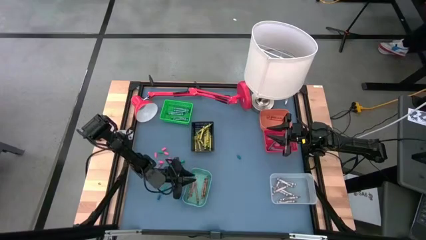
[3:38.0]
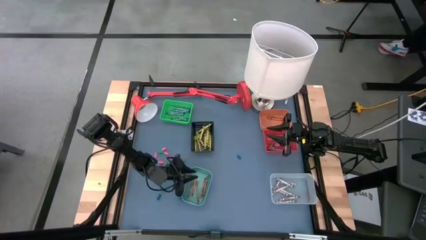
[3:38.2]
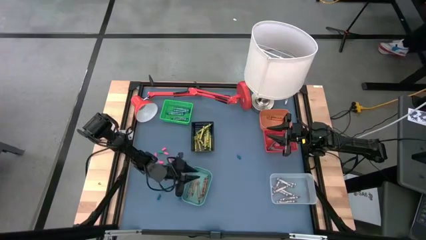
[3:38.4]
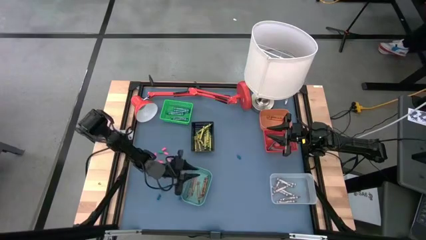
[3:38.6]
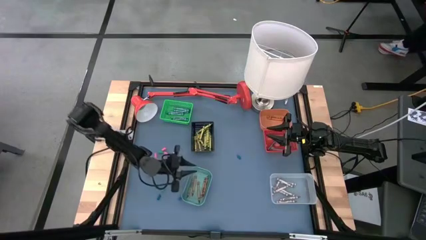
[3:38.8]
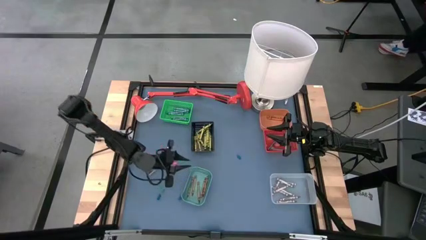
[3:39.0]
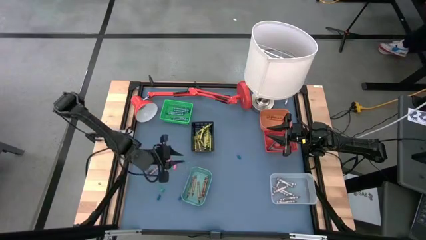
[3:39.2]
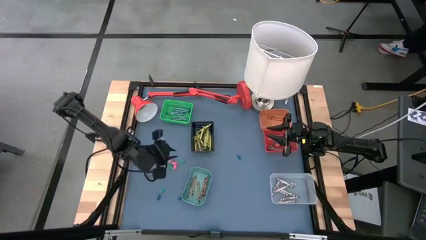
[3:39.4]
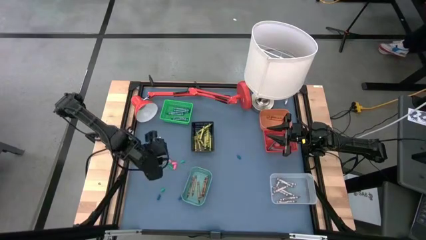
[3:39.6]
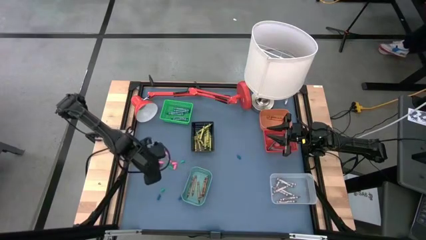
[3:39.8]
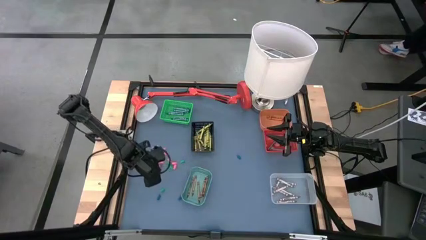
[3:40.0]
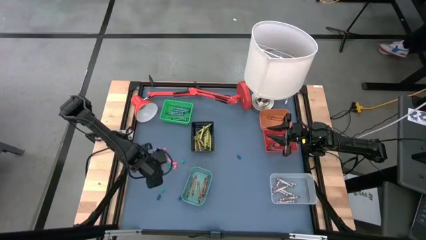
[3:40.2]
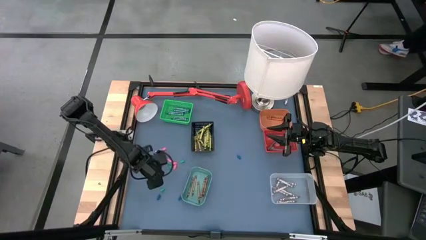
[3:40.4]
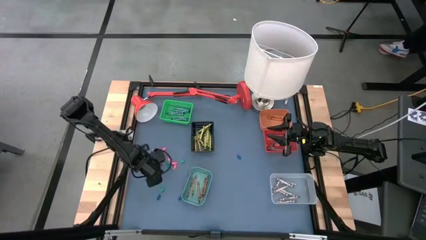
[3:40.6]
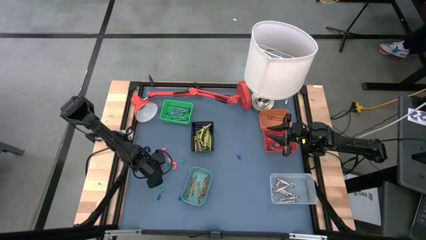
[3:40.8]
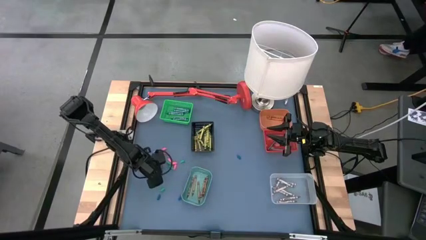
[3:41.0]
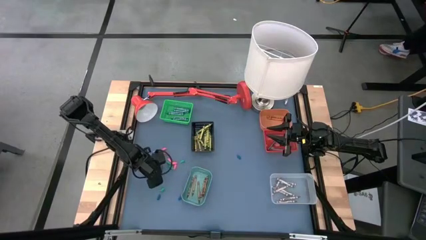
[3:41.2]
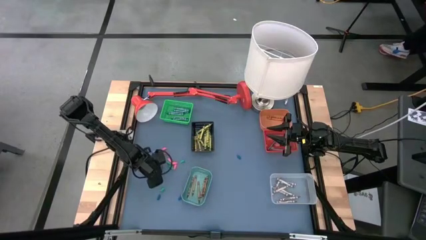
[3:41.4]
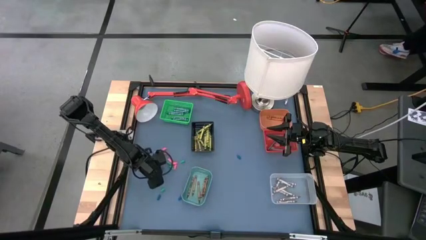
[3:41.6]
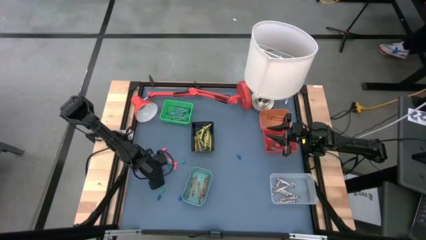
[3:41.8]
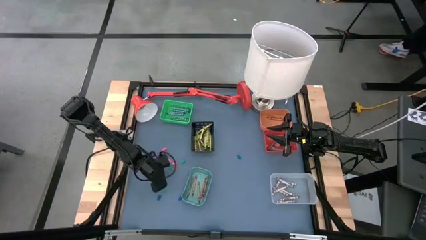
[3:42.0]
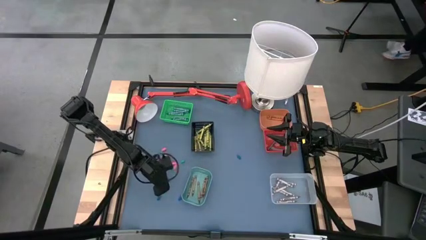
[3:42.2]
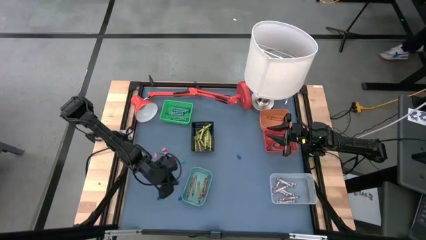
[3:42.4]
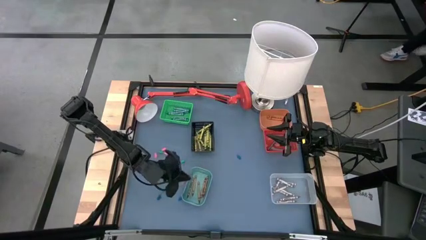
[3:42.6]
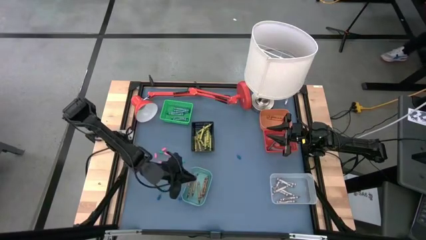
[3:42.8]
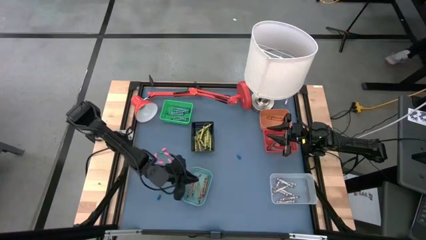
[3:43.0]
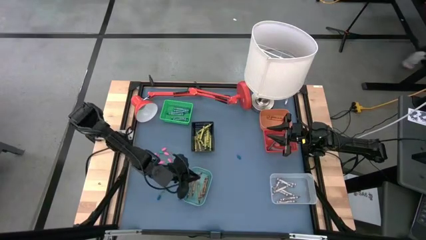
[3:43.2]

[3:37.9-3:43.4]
Task: Sort crayons
Put the brown crayon into the light green bin

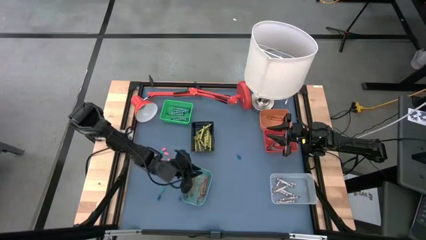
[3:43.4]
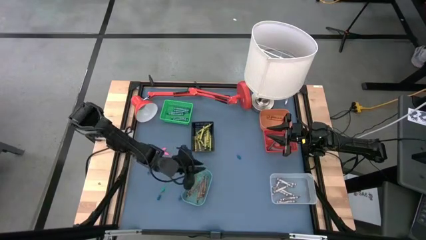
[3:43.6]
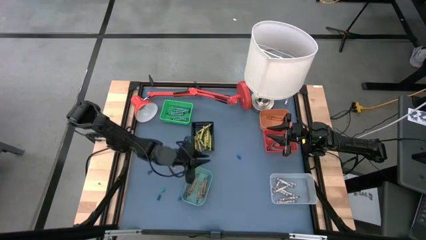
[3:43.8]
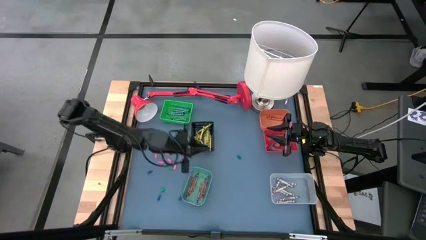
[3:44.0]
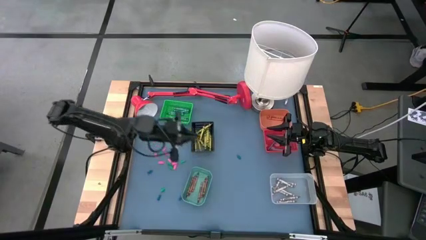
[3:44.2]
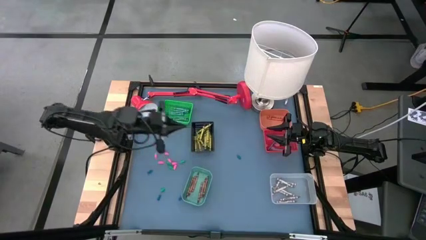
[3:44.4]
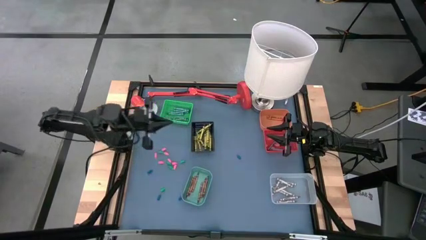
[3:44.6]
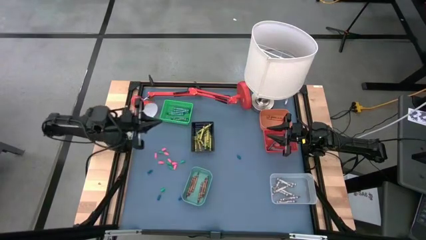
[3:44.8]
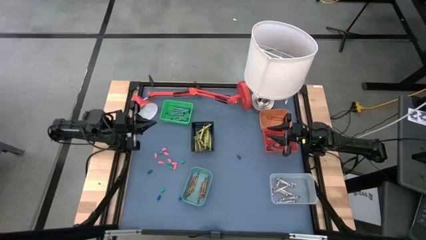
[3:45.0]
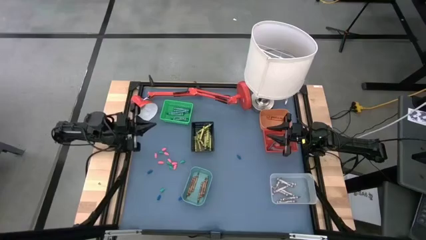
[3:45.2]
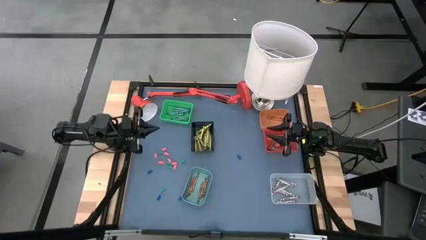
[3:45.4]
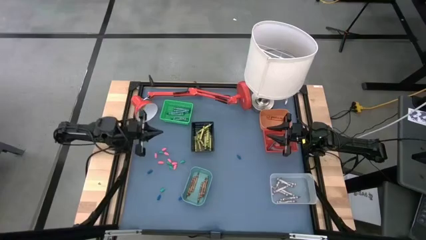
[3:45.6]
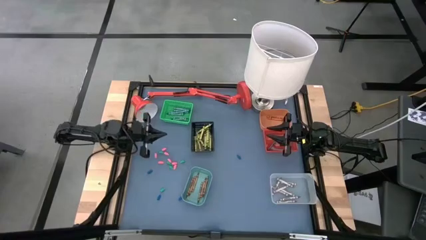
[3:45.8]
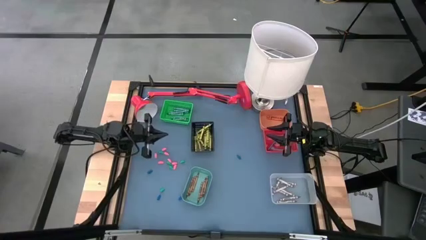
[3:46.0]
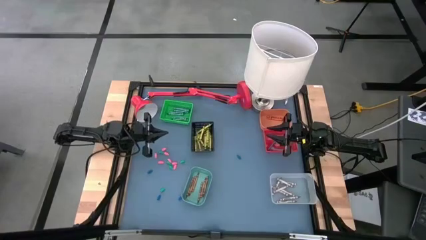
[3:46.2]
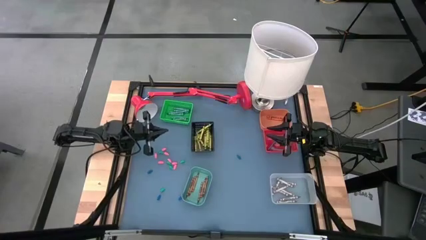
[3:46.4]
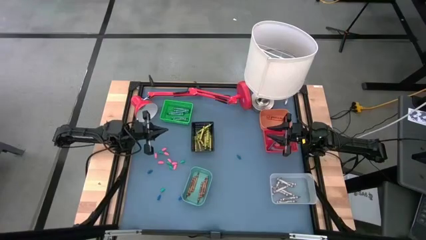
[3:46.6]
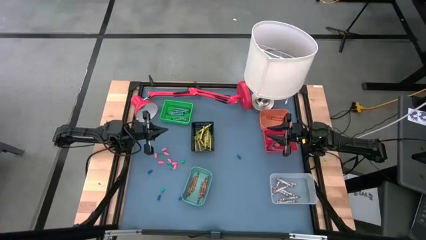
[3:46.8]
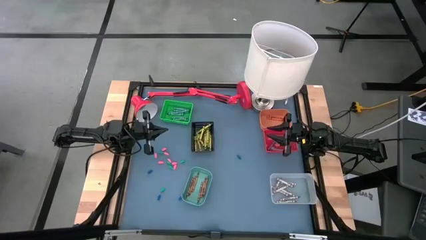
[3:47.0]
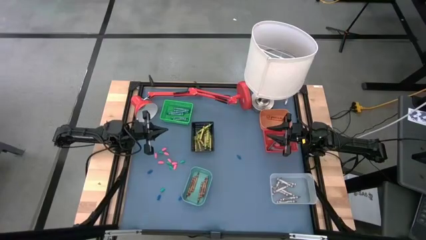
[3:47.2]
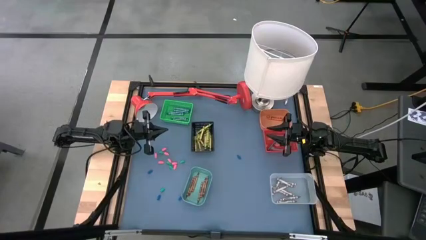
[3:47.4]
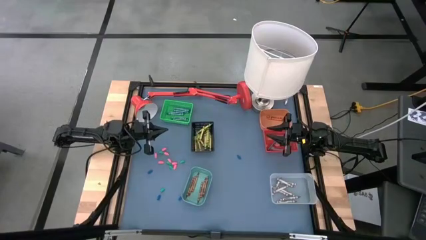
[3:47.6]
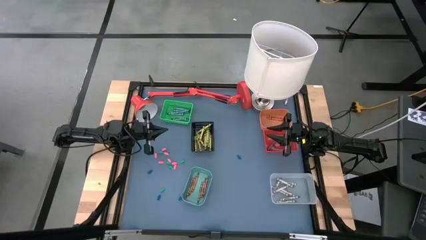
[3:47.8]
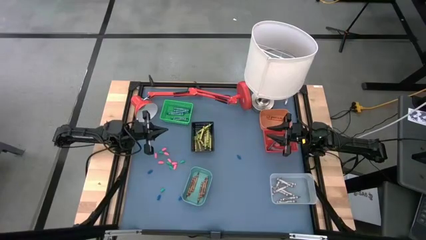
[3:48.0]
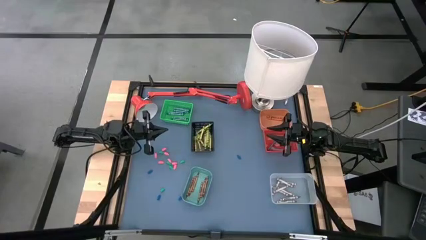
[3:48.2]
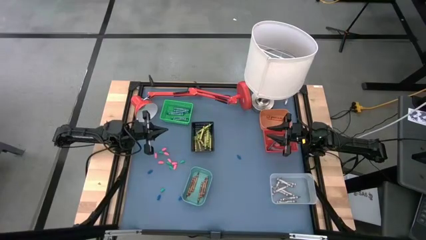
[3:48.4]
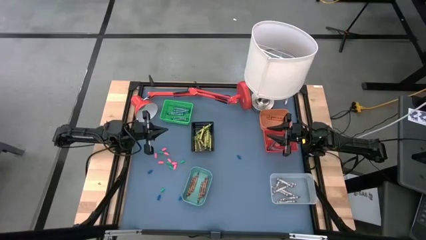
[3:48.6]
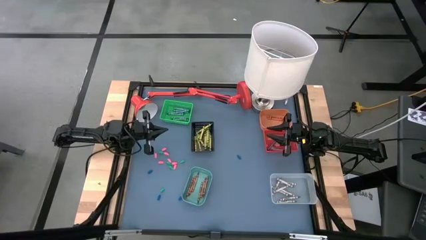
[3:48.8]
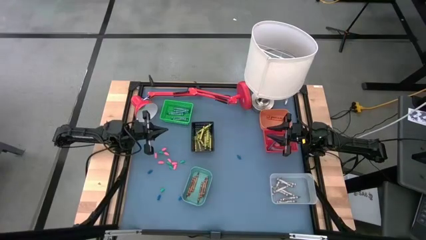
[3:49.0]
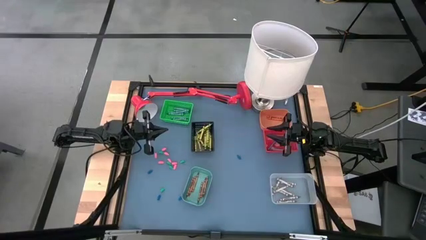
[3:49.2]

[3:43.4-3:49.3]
Return to Home Position

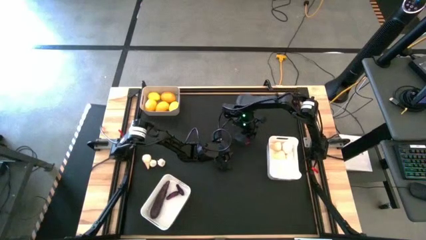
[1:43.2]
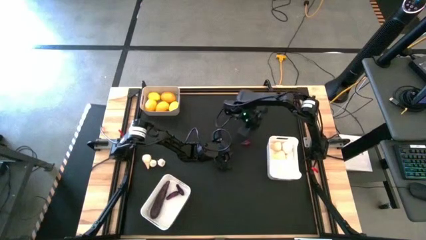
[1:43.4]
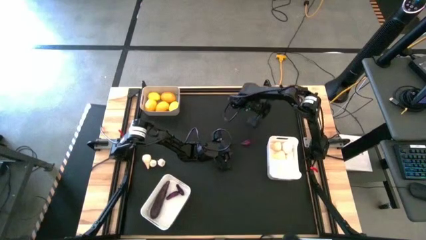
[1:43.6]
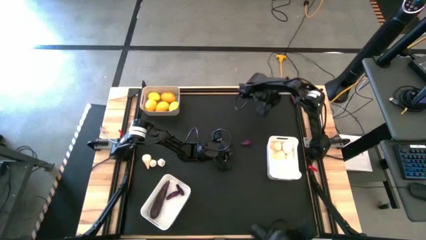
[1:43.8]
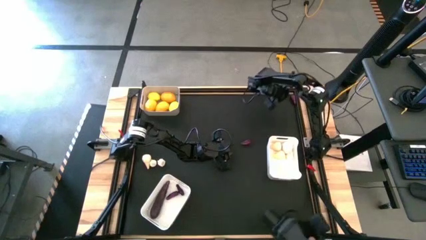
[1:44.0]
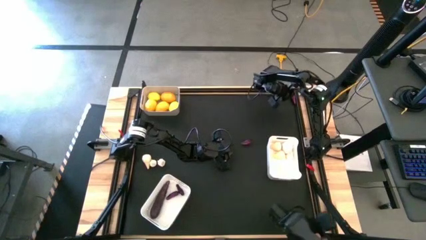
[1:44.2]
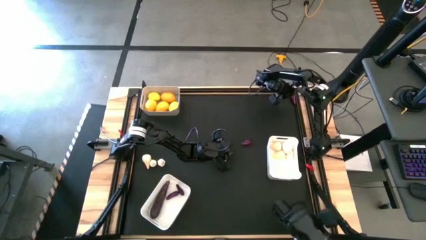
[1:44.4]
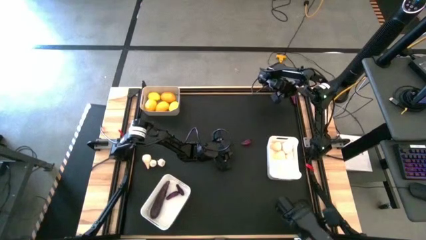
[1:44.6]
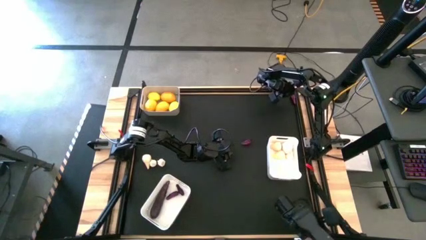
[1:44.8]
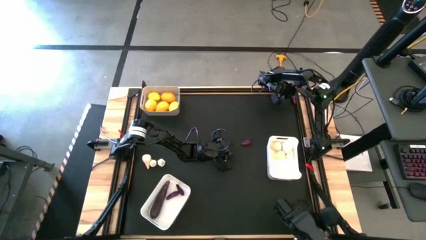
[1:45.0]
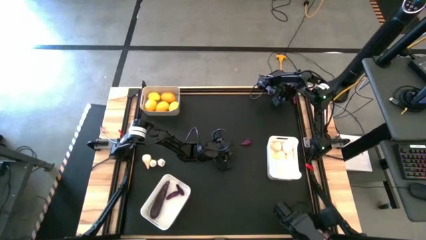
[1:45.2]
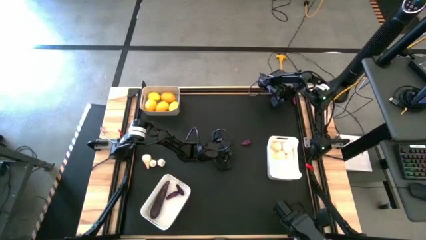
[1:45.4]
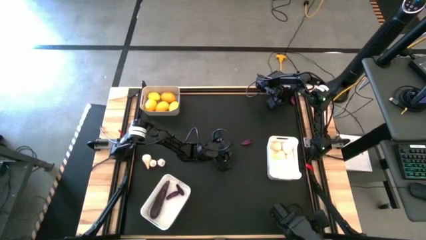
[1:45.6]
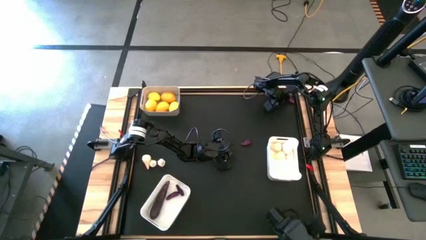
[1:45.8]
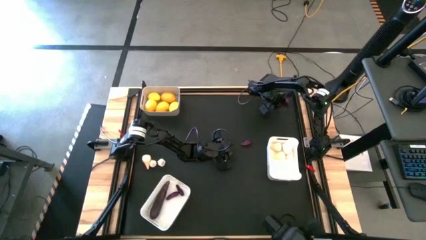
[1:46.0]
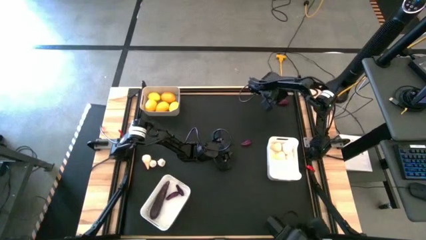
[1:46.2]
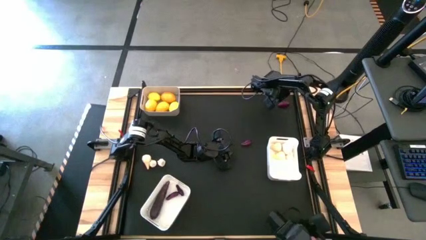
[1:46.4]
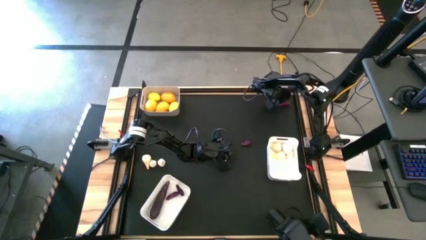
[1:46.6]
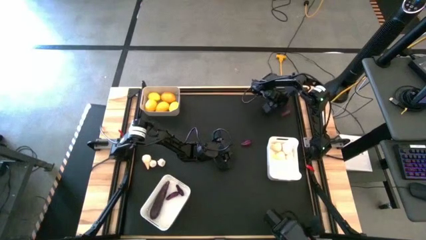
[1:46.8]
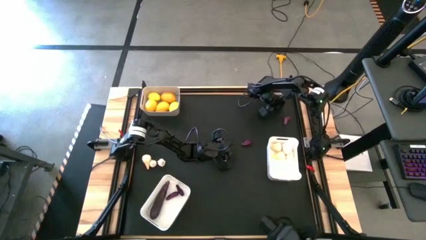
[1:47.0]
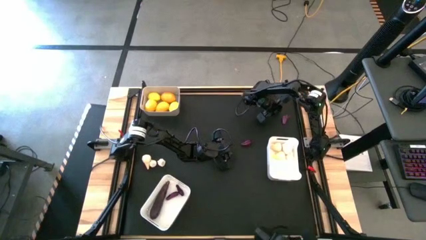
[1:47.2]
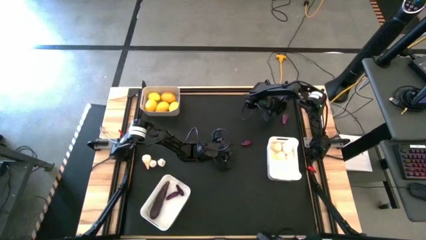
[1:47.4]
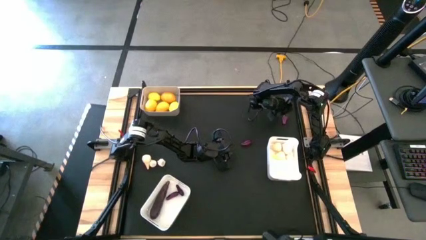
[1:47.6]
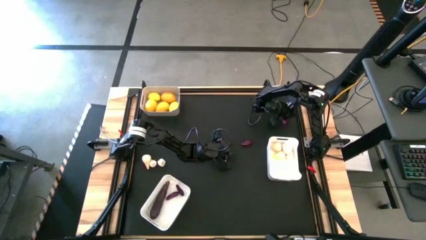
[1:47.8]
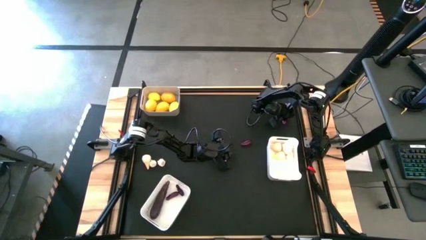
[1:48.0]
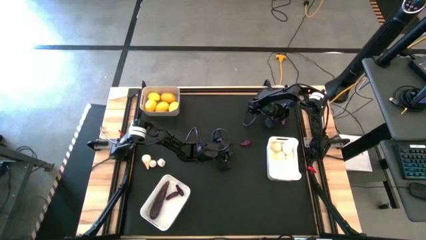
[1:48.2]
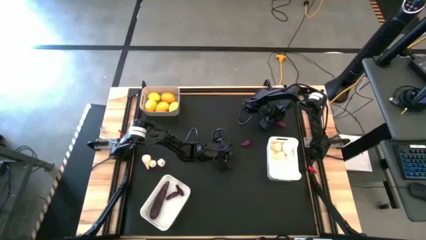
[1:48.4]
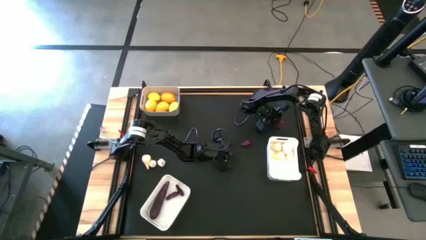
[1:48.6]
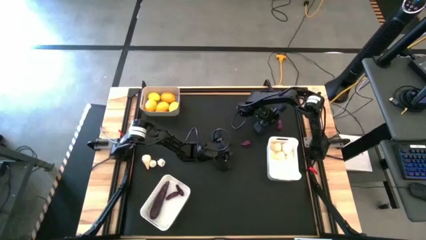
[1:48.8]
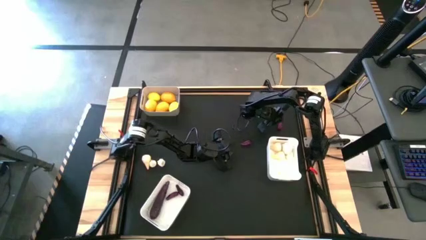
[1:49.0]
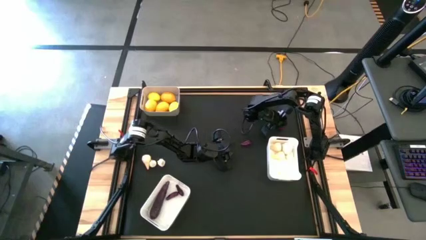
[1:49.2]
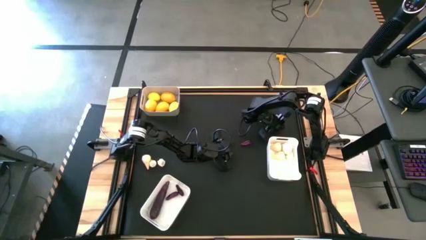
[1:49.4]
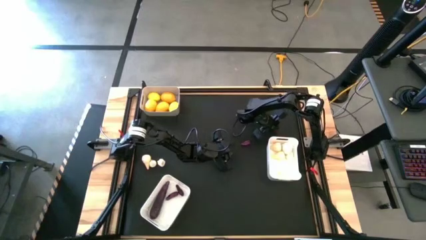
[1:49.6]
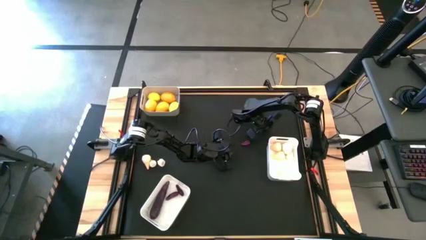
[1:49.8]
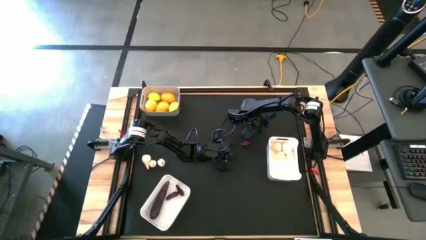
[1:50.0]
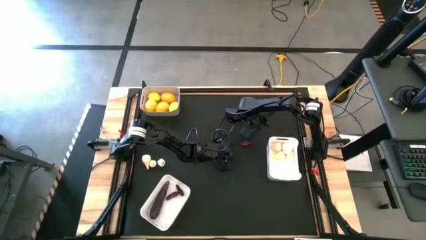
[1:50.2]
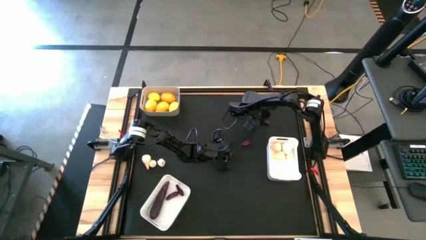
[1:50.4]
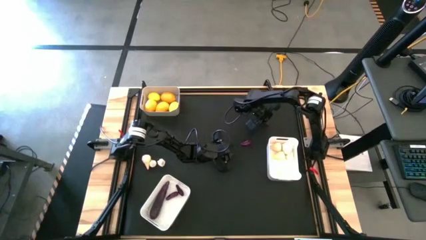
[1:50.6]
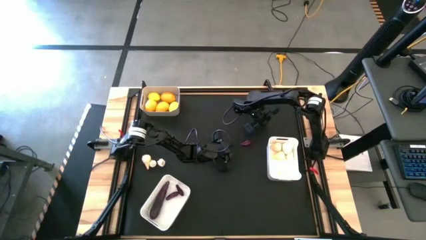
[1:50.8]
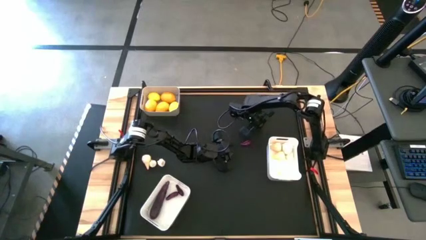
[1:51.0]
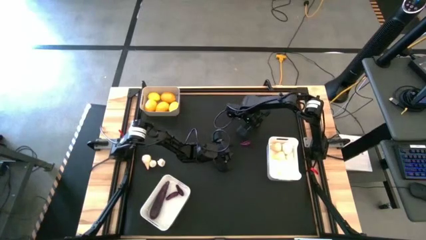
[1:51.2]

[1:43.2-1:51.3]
Task: Sort produce into baskets
Move the top right eggplant to the center on the table
